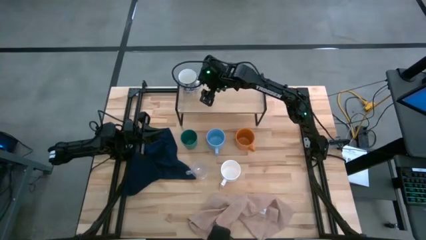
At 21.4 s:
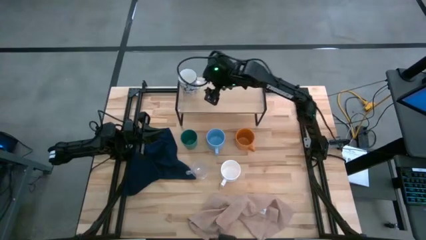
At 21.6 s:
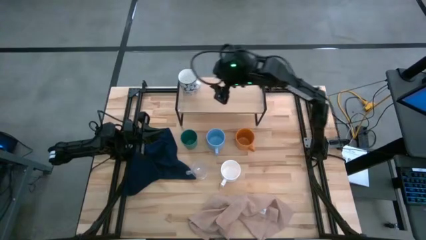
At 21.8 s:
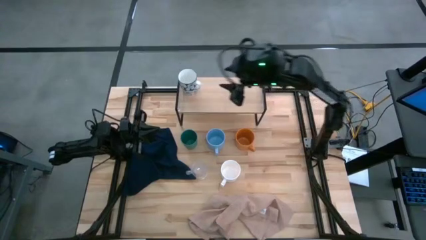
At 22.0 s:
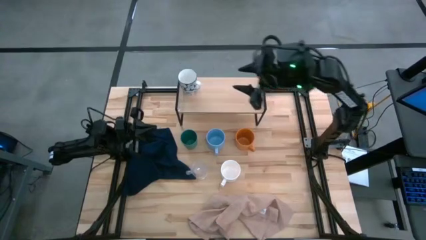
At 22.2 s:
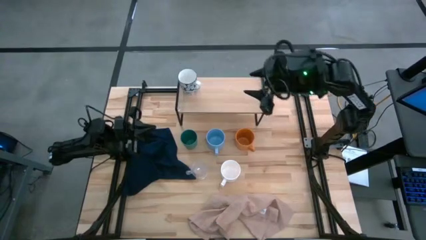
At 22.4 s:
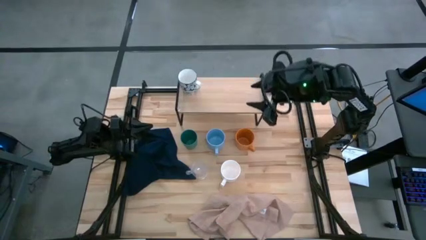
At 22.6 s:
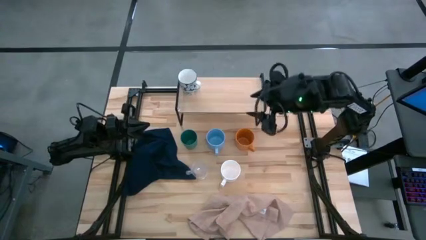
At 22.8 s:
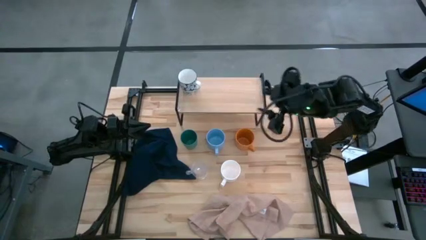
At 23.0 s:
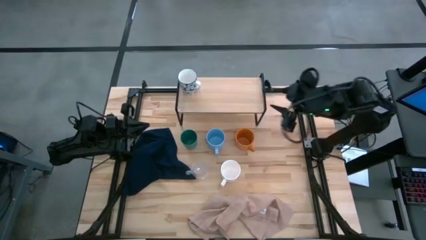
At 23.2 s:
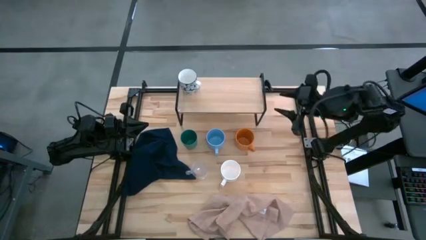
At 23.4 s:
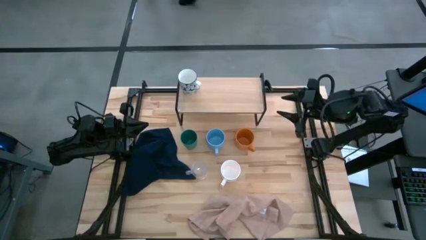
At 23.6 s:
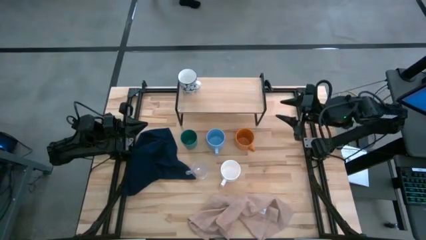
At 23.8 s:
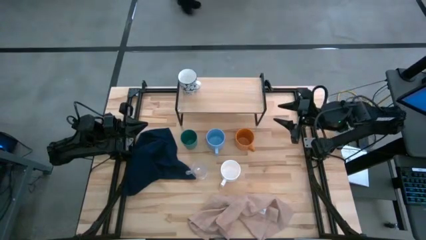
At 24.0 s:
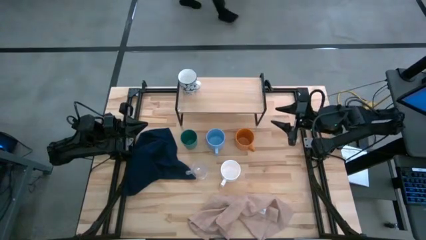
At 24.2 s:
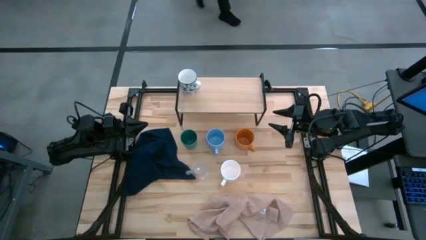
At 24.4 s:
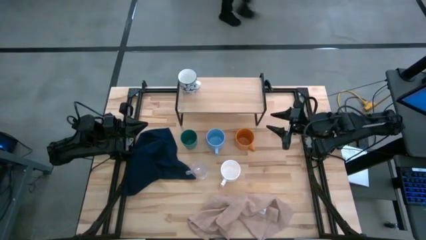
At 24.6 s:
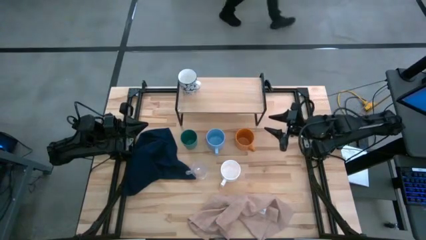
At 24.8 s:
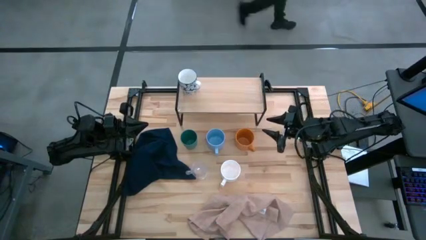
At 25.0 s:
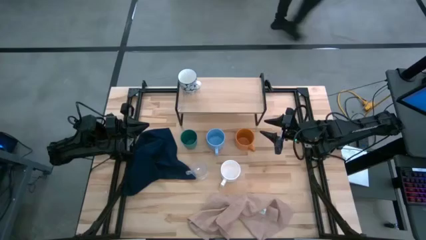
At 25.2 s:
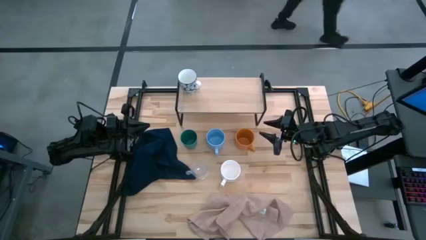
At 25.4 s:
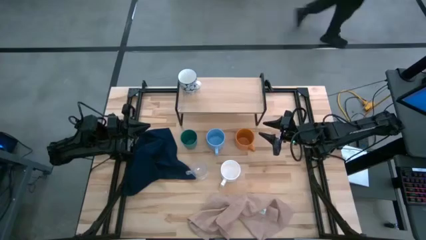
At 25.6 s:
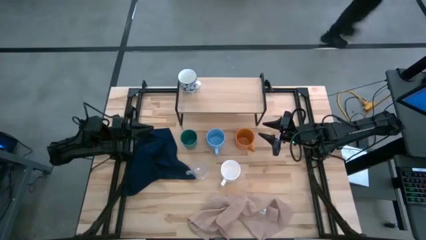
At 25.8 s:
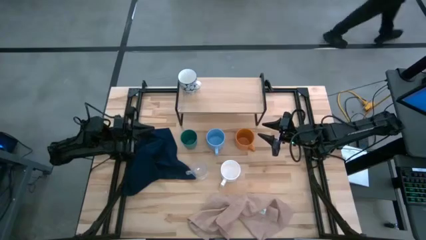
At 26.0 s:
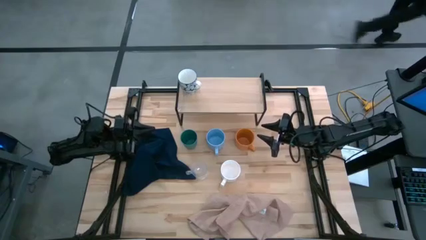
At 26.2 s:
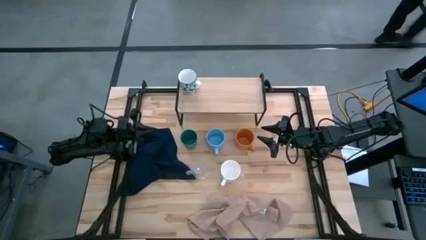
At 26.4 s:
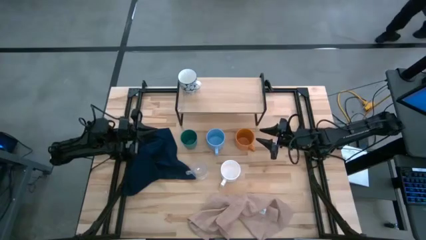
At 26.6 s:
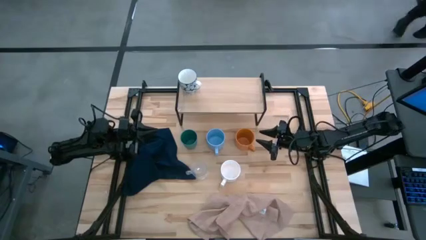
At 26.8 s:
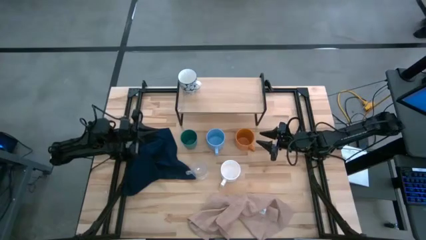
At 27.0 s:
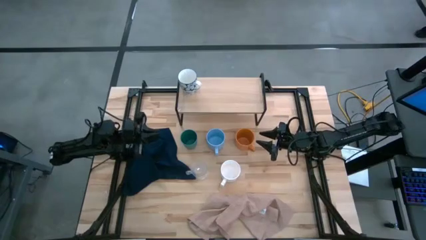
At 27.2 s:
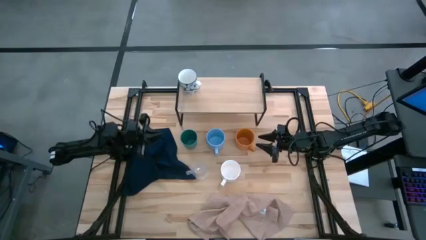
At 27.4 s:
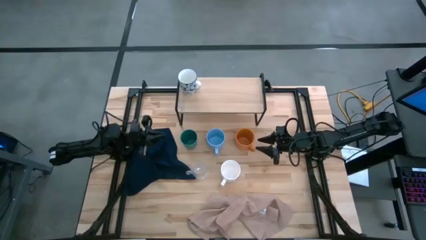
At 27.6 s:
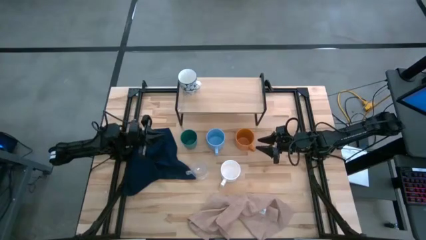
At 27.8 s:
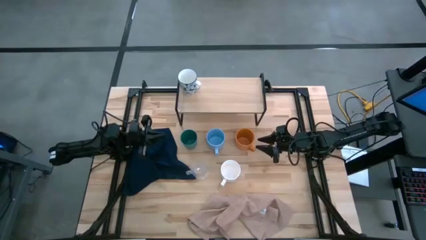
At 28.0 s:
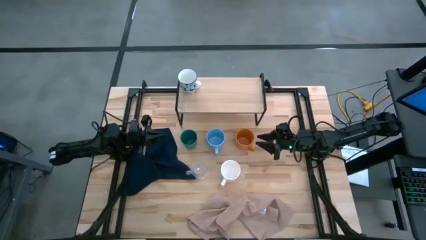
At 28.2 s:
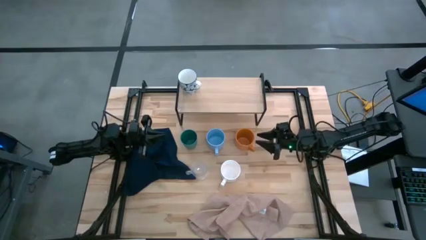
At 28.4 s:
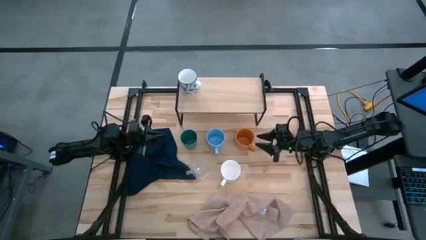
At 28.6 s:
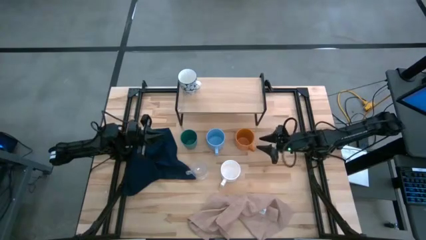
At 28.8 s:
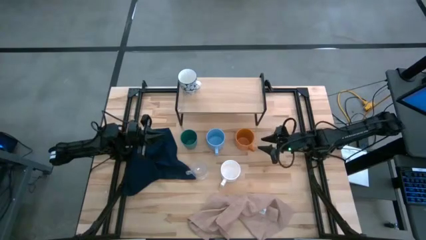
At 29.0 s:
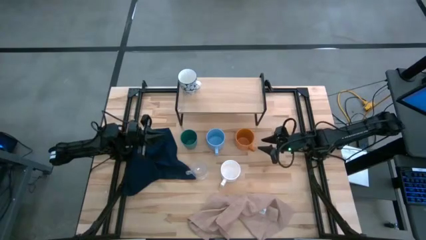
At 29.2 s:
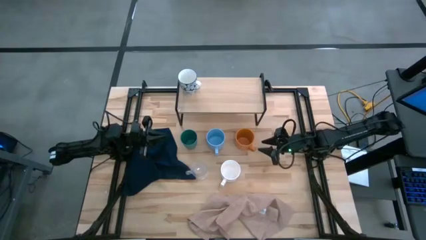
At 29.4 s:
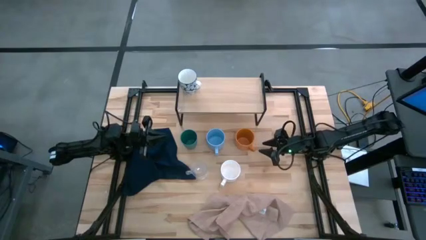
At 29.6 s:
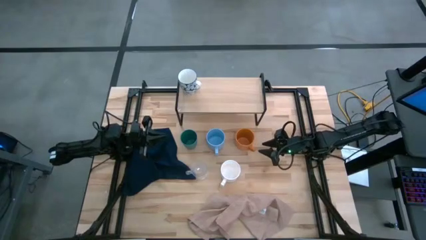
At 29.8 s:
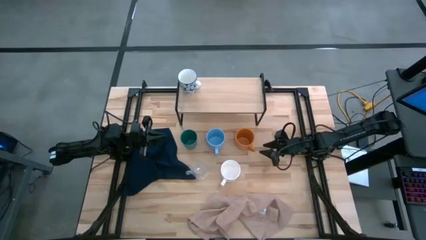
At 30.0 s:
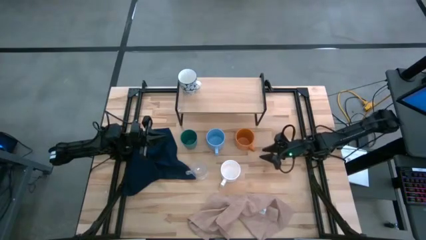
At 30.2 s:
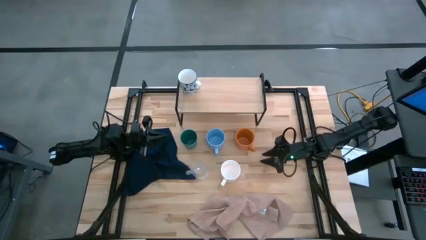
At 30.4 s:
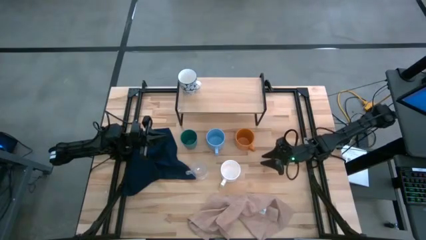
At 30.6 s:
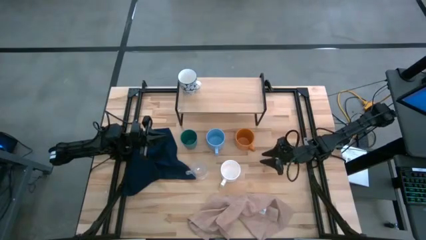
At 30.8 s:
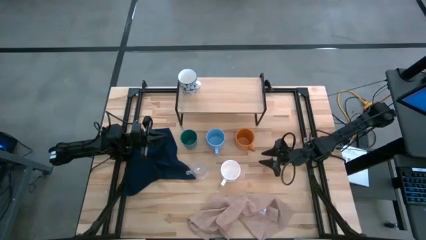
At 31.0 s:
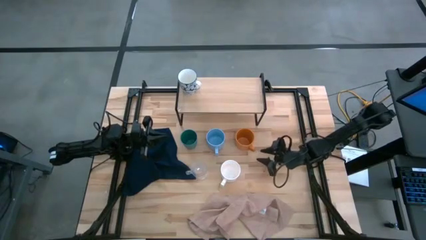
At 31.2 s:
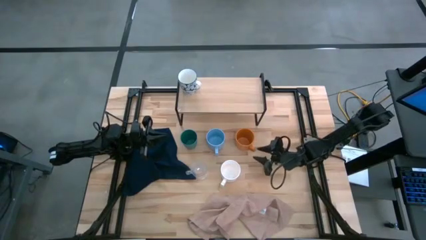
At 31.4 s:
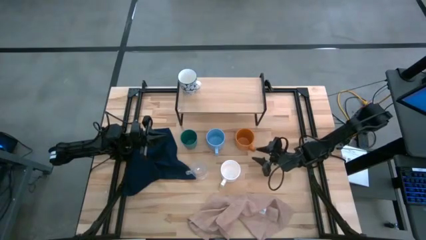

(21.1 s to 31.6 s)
Task: Stack small to large cups/mugs on shelf
Put the orange mug on the shelf
